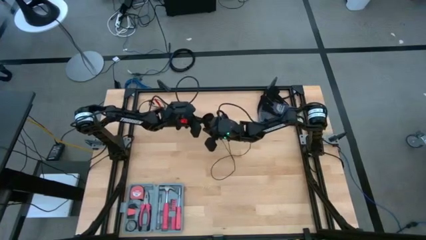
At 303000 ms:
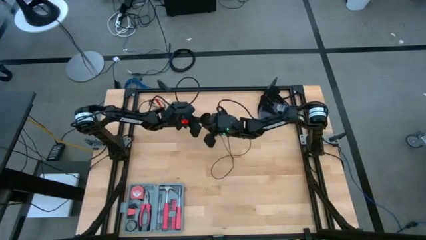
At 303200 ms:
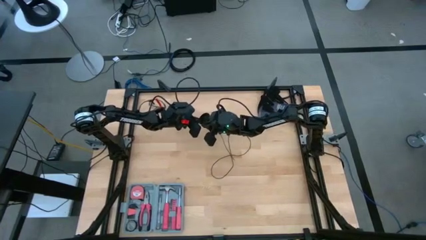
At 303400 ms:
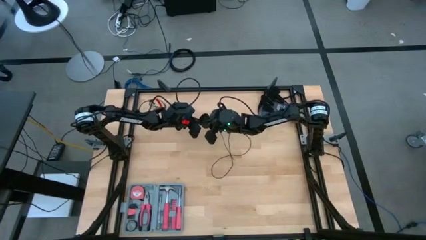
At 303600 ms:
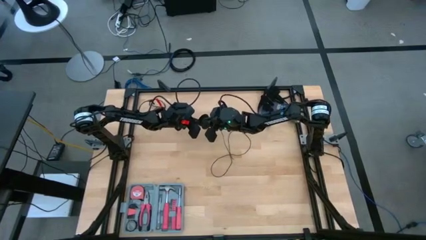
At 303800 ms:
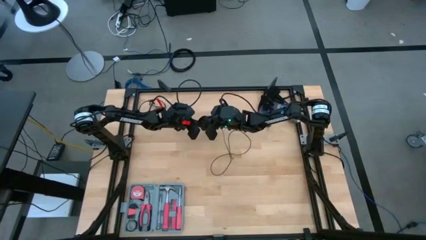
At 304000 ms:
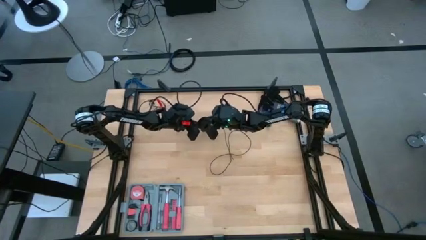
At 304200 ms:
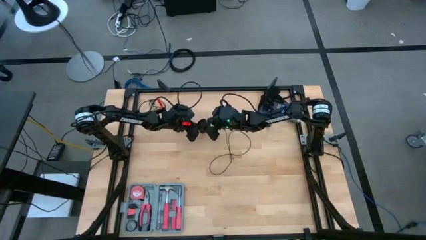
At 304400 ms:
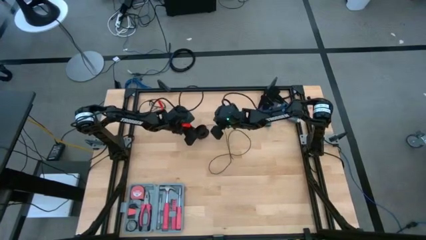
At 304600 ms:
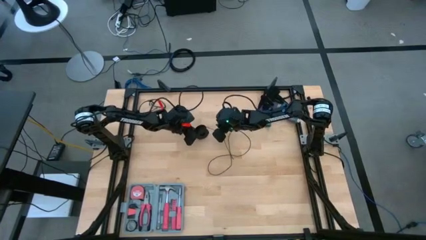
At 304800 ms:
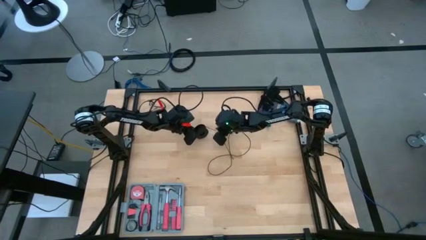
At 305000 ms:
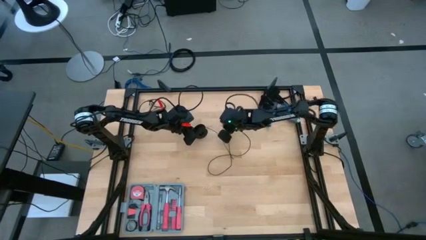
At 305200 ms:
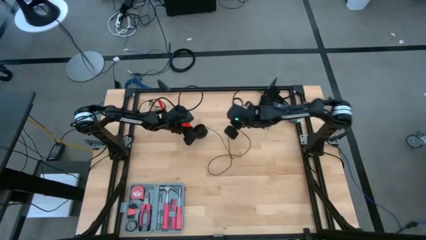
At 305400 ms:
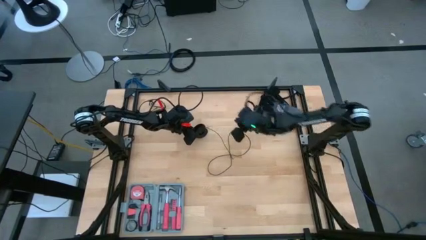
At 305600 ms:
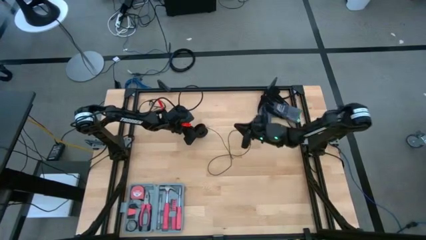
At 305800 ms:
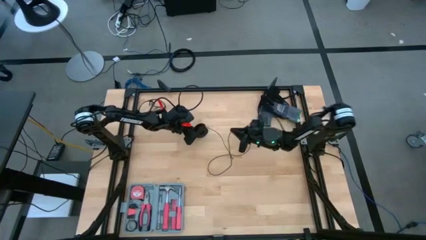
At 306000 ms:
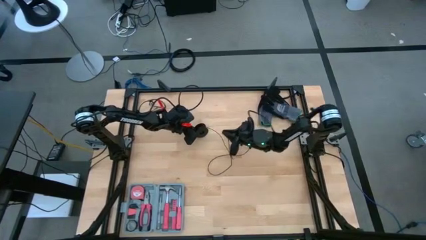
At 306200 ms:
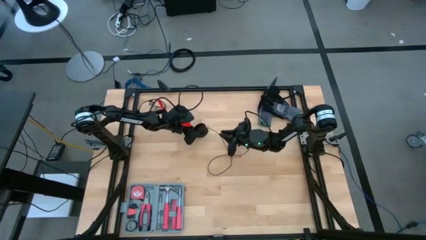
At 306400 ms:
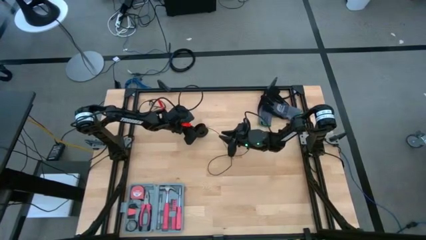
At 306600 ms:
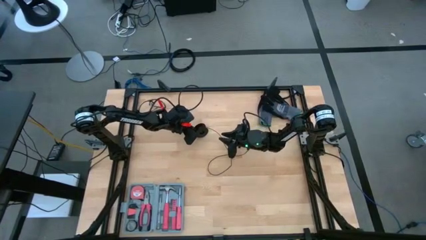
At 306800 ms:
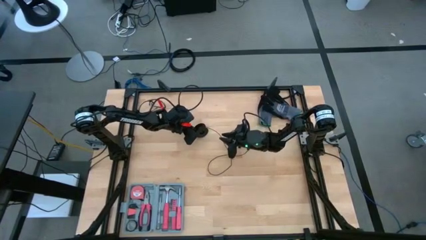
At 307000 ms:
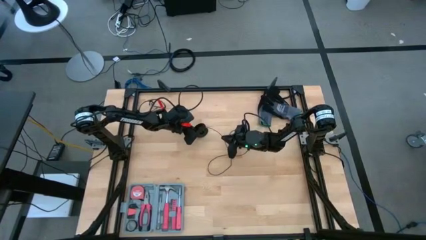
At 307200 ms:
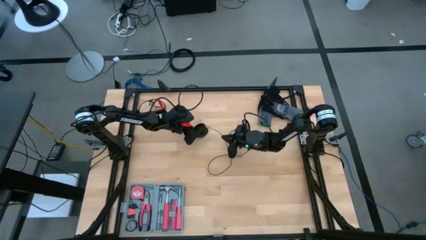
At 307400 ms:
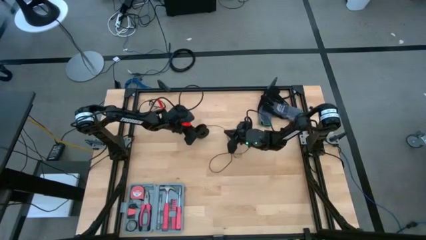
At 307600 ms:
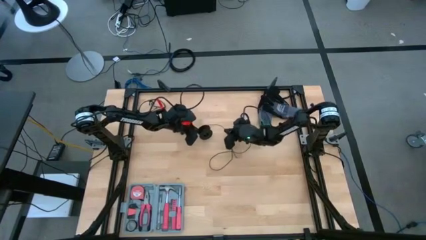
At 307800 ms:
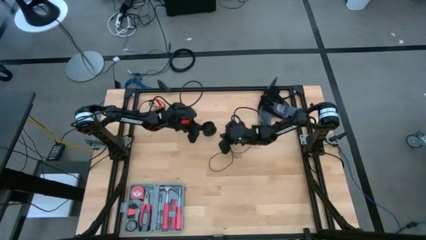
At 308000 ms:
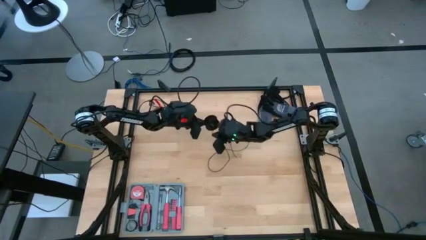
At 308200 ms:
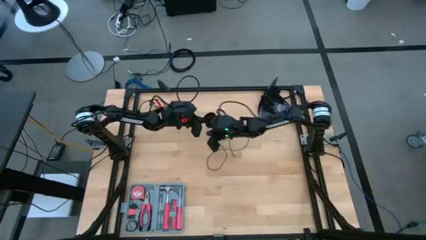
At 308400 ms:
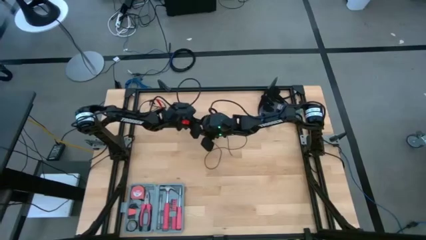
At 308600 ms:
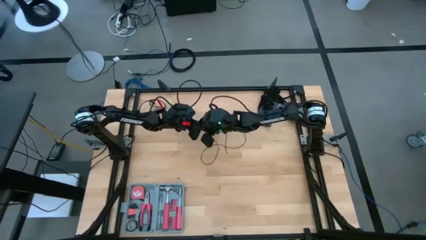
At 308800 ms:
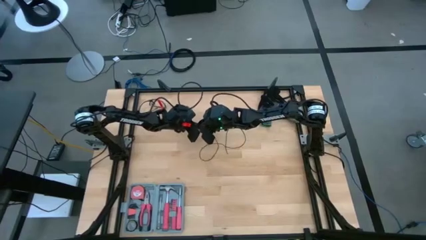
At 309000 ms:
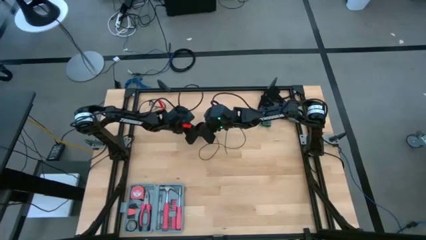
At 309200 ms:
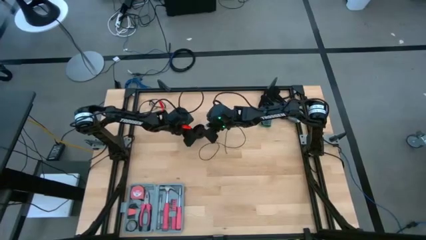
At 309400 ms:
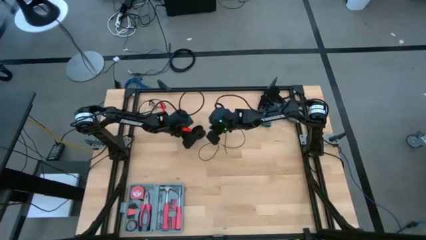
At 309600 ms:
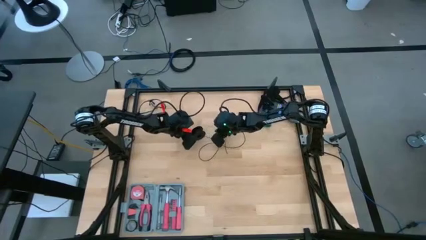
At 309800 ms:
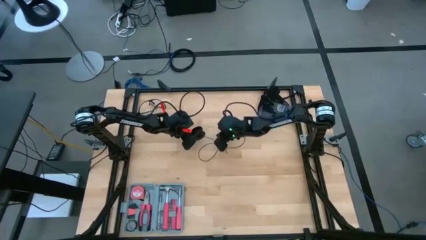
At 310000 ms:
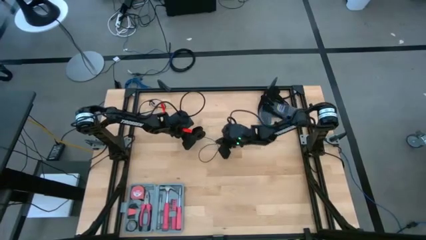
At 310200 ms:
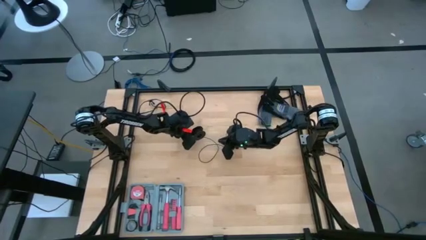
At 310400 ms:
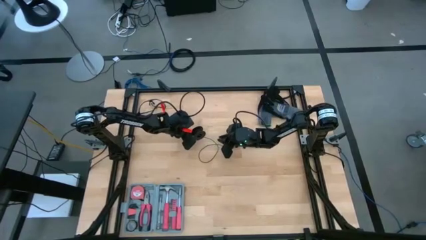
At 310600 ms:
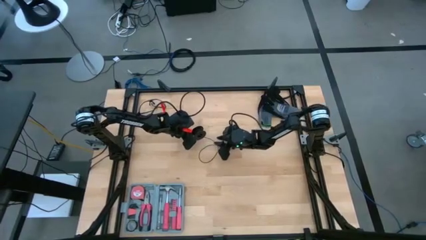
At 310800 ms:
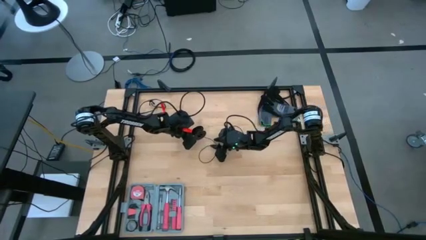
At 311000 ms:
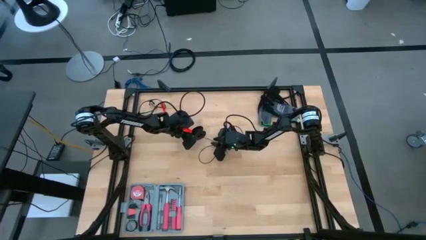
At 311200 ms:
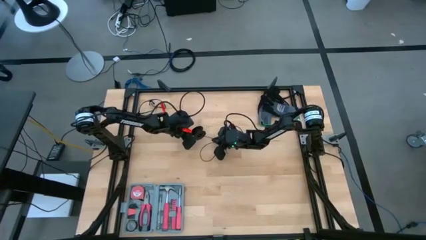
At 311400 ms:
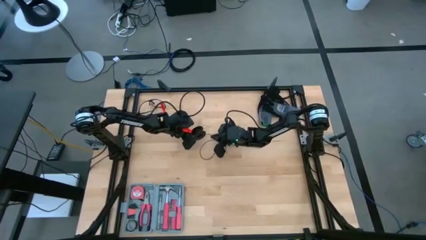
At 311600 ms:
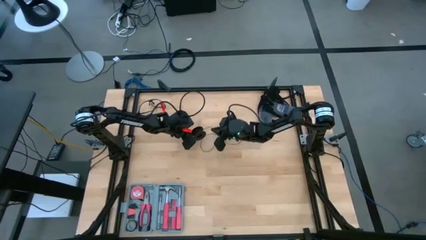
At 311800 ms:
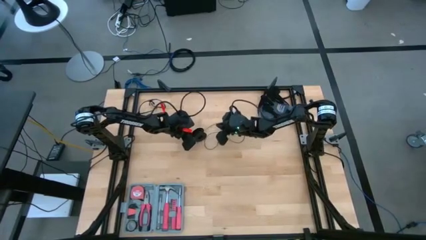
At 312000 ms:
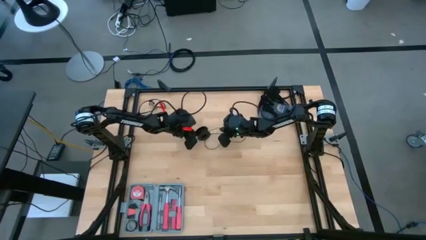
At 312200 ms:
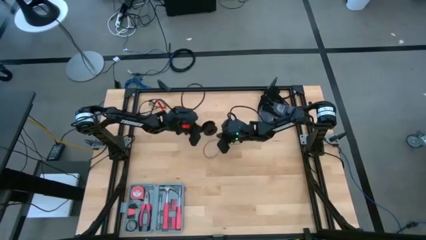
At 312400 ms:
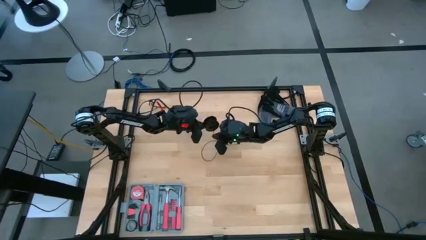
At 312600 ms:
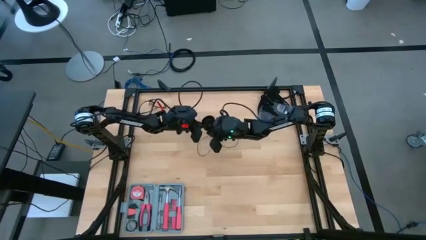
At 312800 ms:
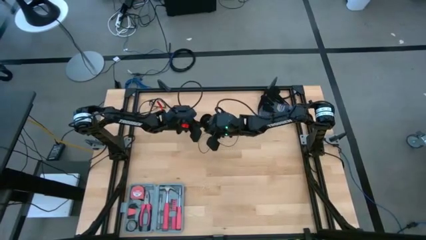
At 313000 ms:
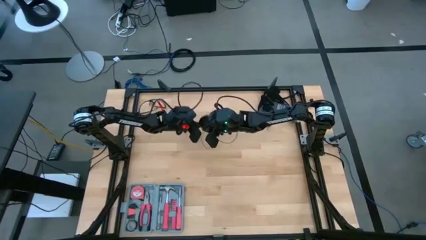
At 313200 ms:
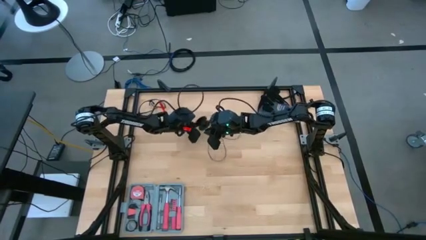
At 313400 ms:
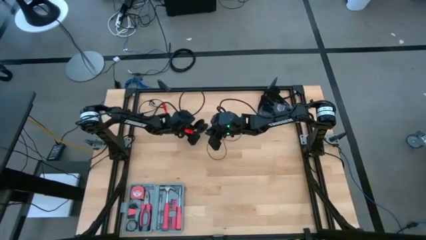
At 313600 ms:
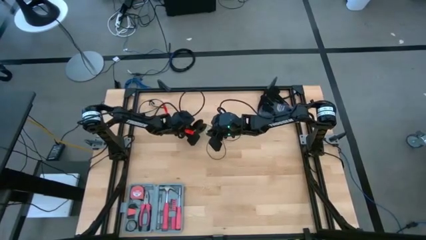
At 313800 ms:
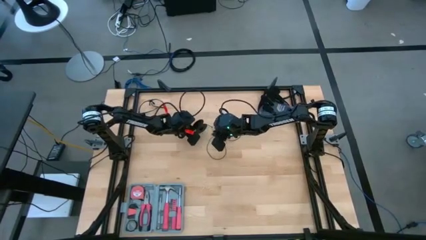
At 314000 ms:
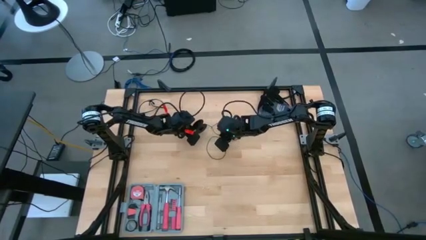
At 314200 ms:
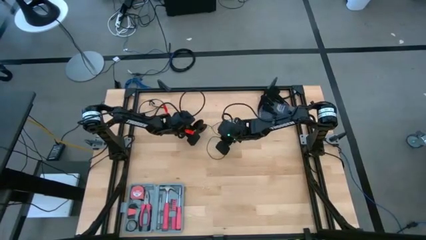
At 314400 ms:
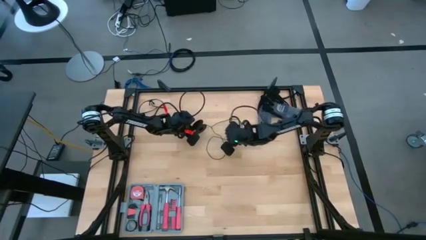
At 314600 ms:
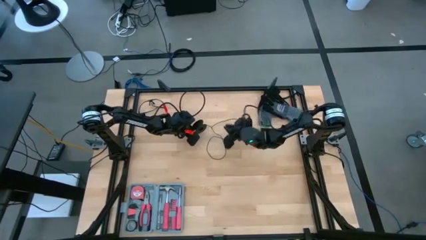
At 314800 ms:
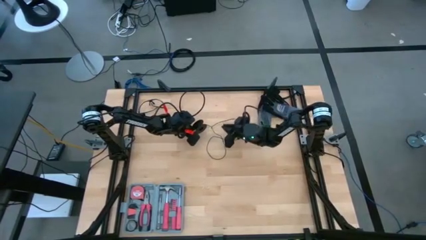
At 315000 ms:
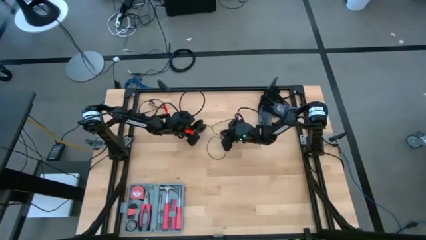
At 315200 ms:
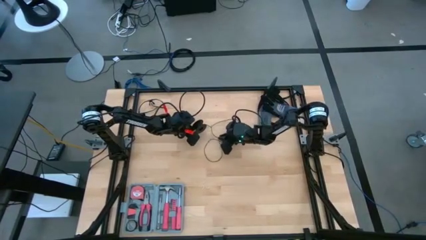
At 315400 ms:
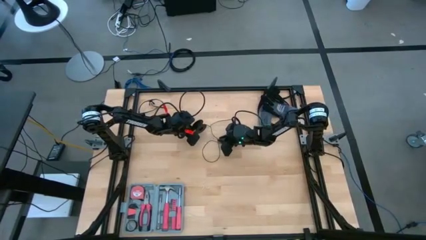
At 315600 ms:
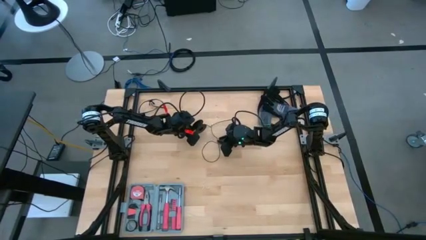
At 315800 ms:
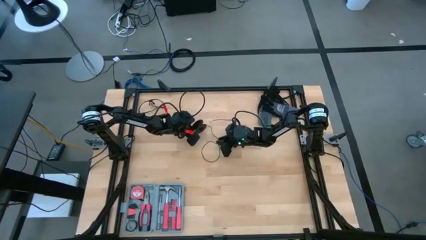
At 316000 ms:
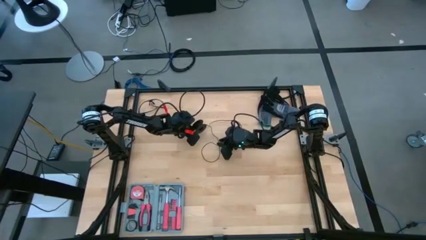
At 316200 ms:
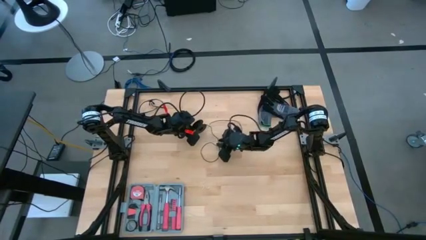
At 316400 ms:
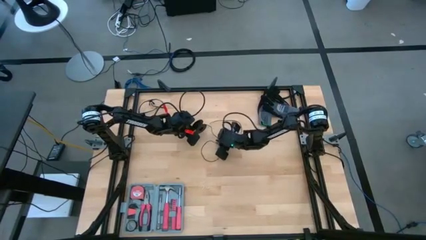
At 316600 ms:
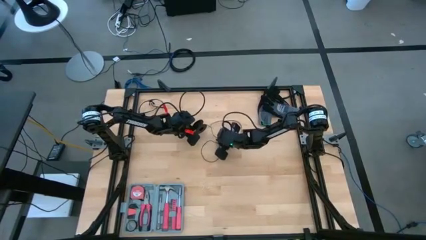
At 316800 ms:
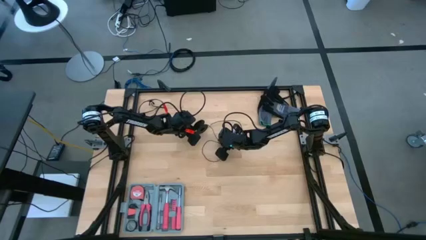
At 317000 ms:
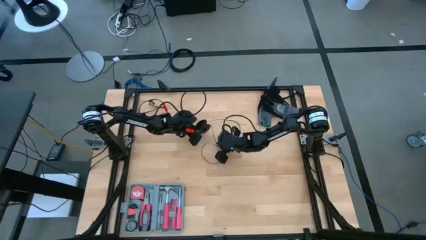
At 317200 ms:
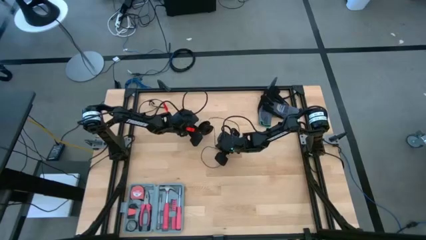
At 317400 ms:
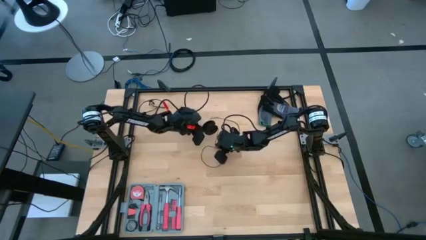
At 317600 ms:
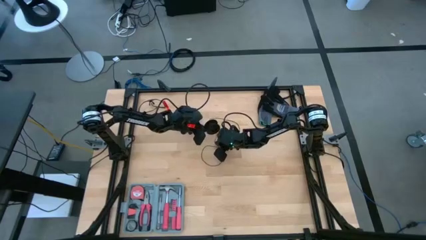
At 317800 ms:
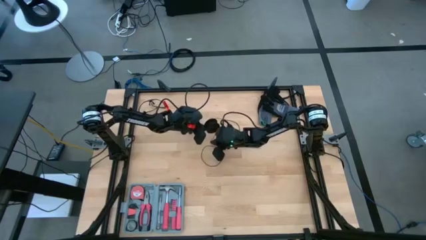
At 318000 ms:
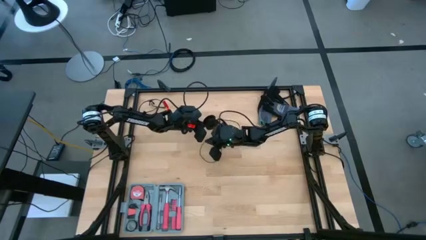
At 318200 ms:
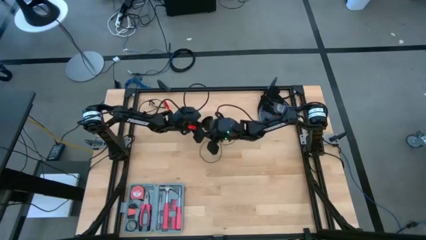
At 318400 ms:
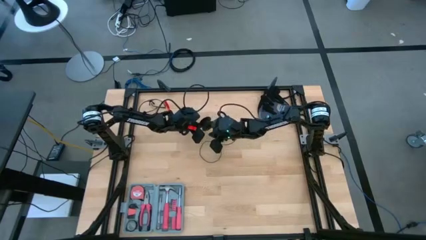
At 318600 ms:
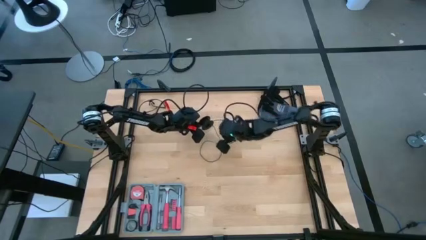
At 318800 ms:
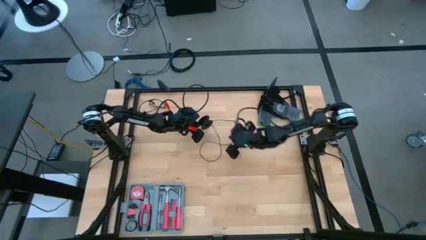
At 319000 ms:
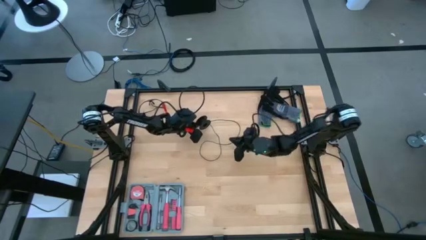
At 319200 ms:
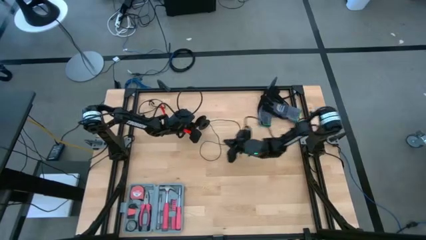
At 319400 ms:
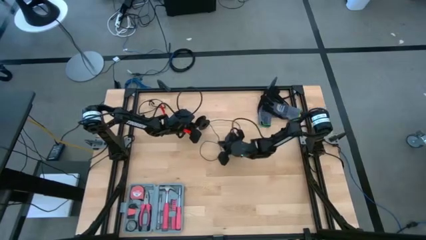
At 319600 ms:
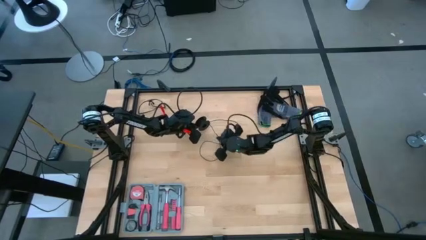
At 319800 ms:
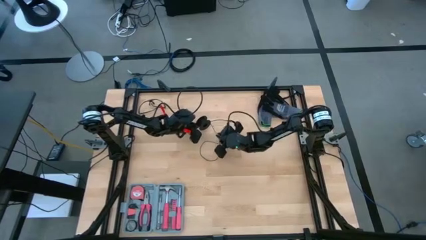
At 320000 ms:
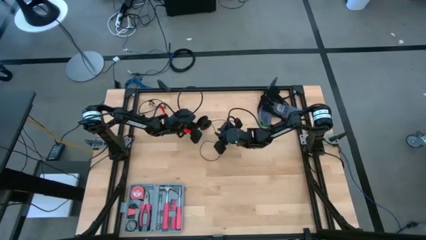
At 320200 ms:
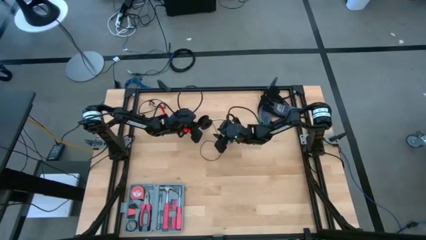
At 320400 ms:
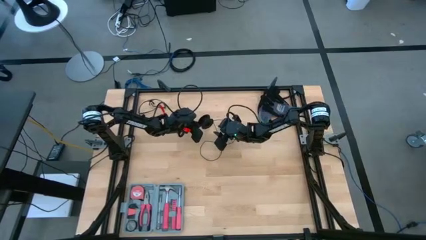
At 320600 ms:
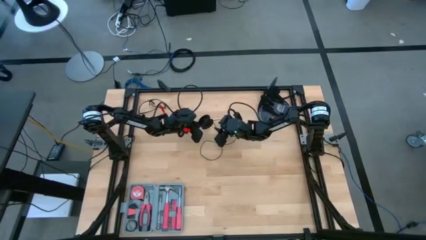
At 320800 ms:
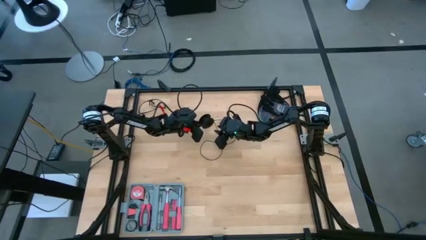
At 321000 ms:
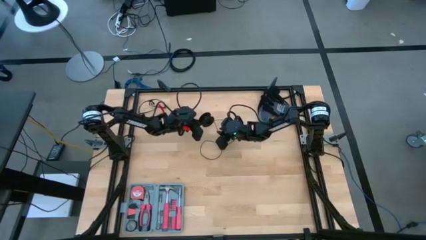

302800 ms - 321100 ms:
Task: Coil cords
Coil the black wire onto the black spool
